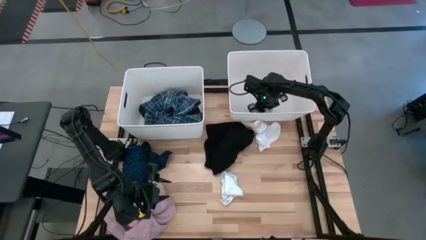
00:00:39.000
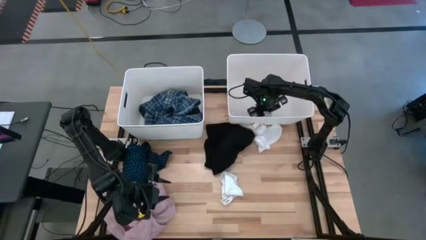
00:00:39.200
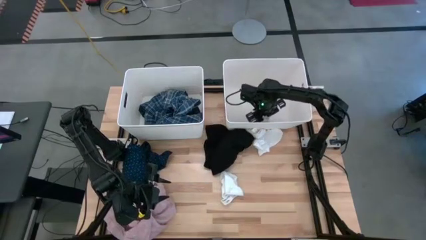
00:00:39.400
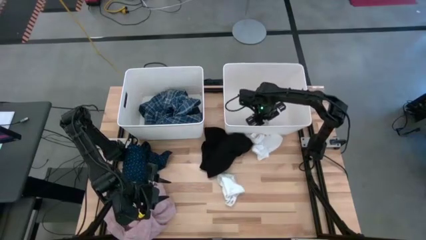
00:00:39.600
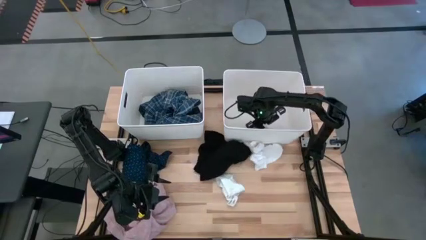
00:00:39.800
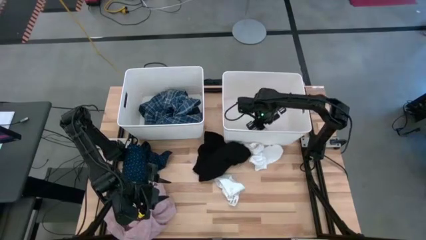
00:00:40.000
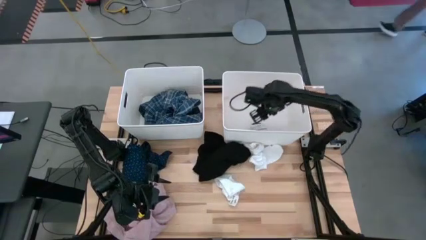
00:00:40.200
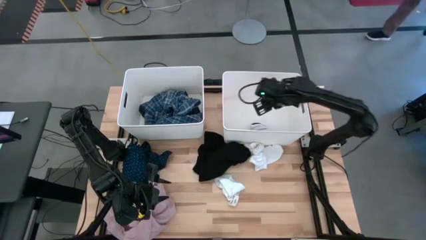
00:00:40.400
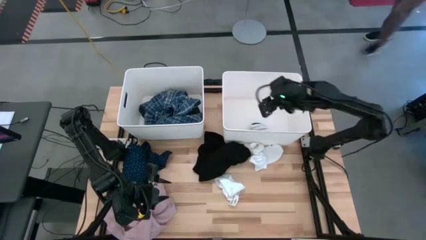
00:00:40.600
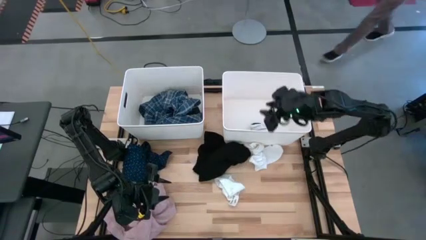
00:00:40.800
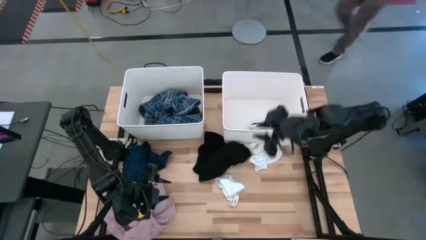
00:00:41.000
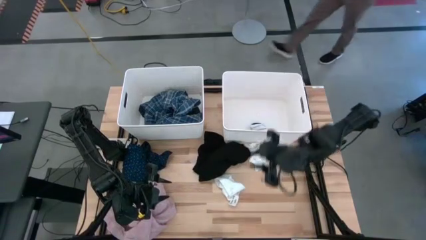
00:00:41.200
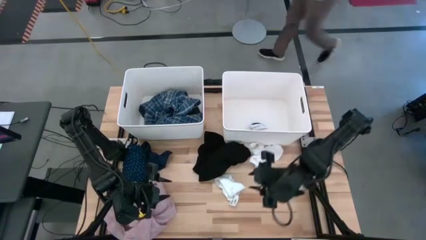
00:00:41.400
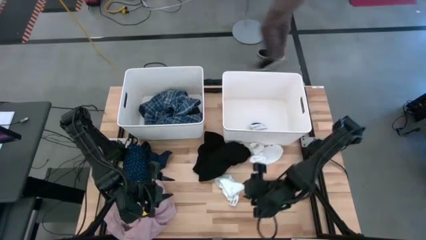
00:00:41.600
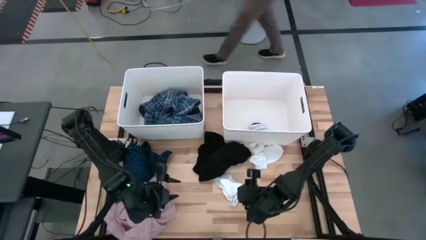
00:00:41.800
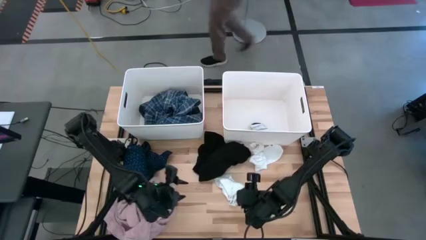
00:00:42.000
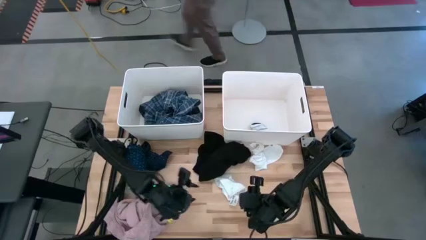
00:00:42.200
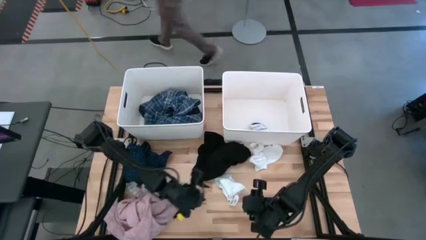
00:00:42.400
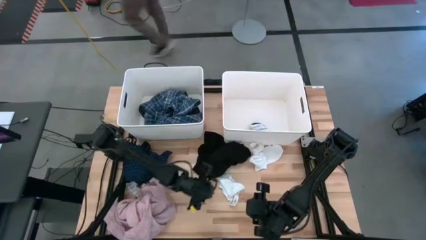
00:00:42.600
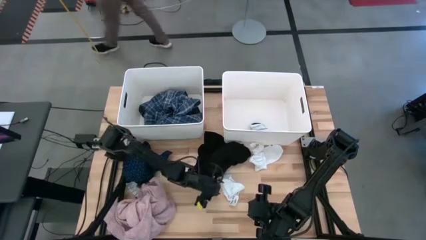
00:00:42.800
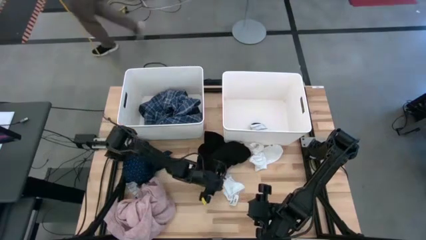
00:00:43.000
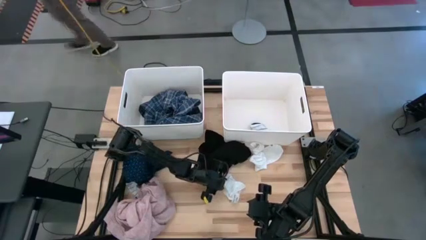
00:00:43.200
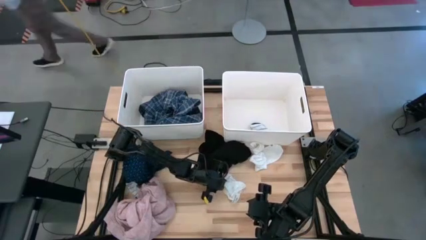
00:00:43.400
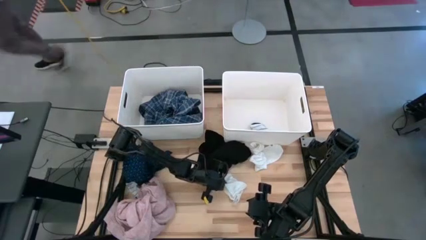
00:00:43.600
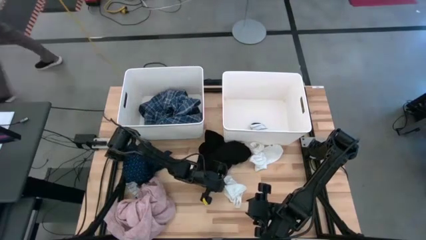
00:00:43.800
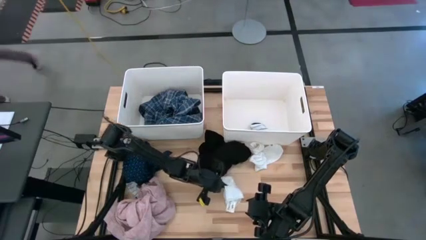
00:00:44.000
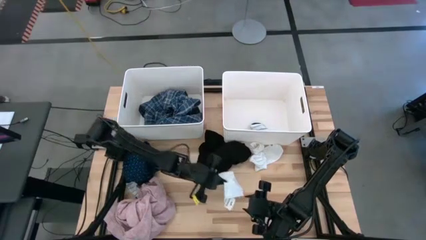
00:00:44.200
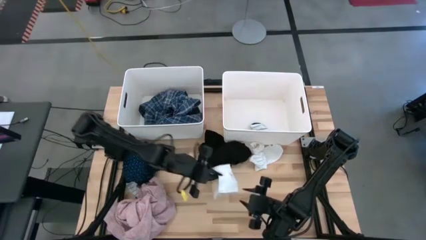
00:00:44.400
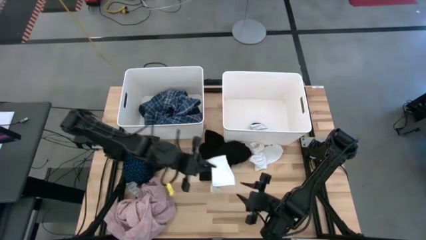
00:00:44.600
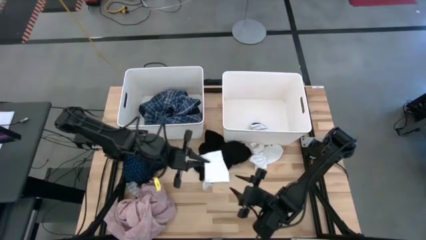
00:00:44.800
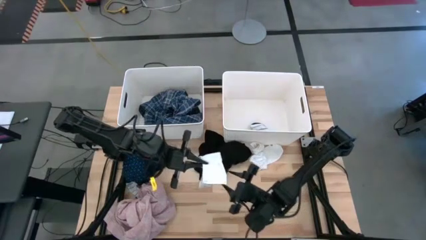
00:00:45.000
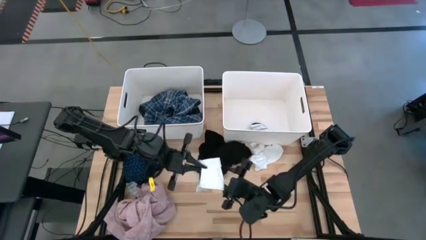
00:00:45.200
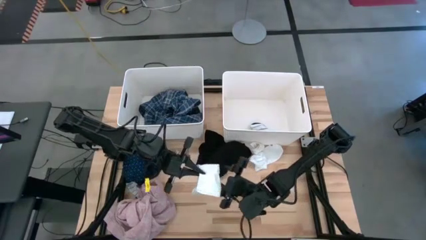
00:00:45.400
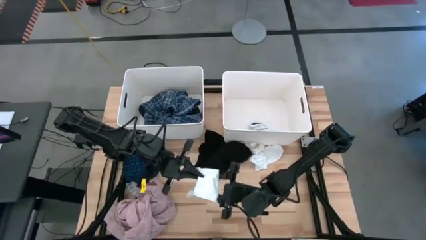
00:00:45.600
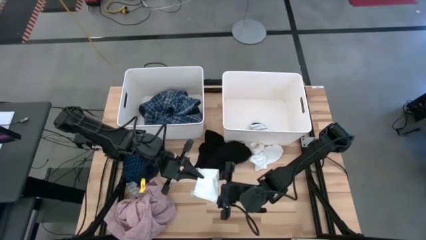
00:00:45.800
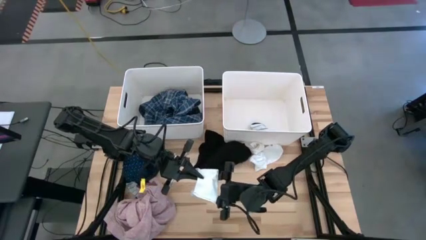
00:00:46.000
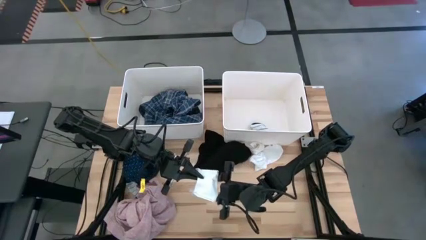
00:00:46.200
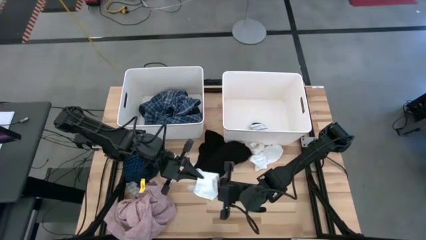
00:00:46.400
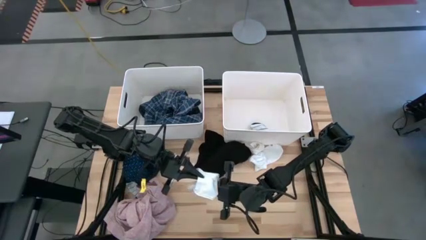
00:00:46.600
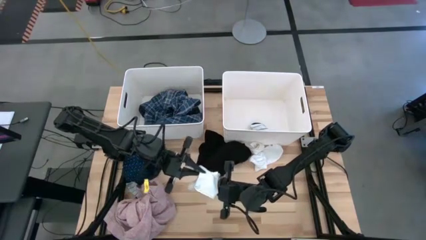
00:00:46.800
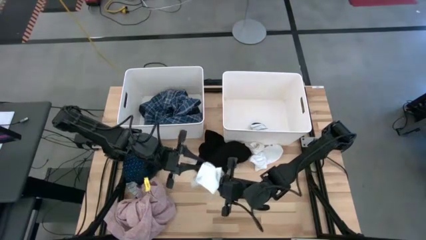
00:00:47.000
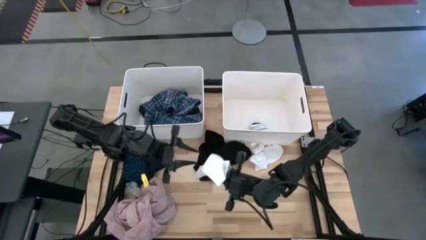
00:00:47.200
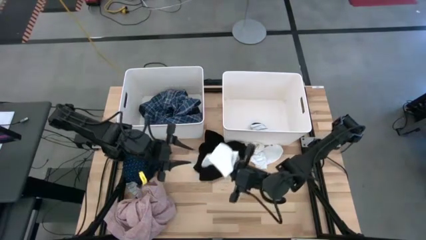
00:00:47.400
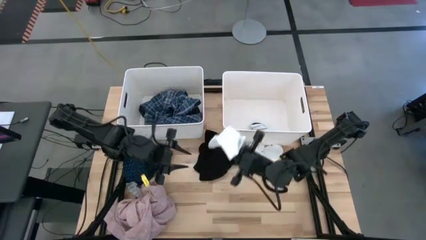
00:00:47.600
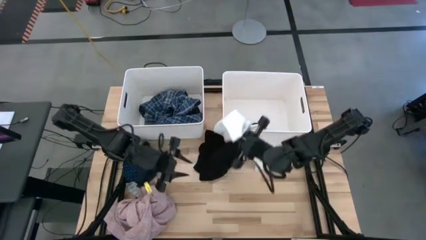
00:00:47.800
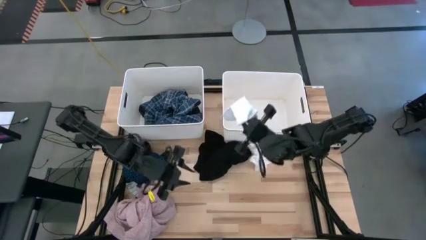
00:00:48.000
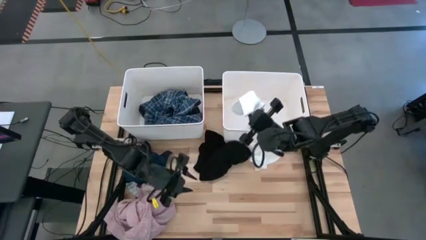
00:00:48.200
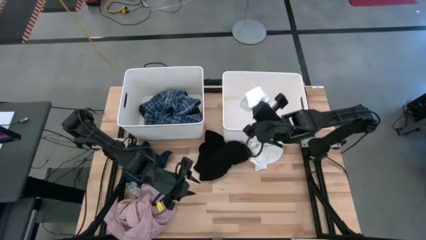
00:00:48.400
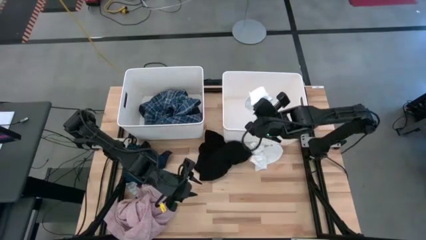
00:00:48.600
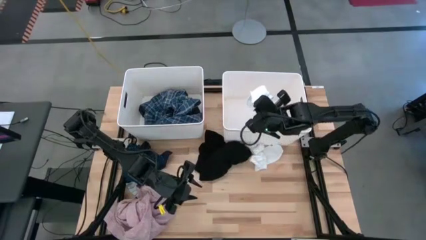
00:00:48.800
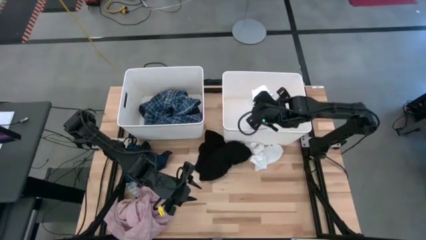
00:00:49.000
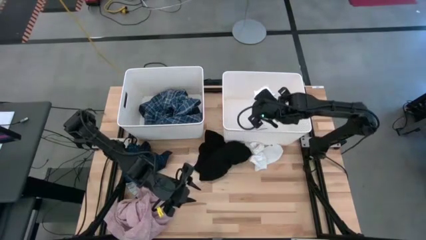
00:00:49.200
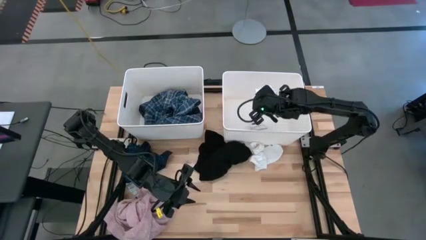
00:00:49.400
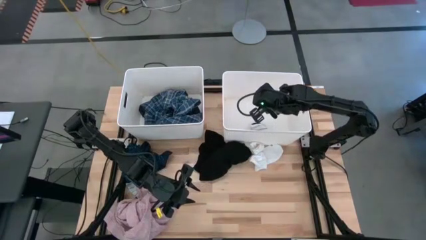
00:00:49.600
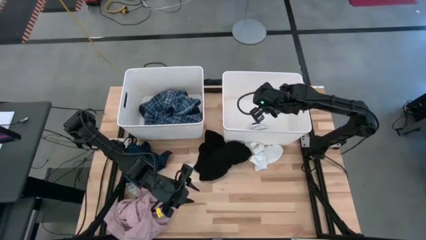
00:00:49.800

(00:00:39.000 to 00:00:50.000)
Task: Sort clothes
Put the white sock into the right laundry bin
